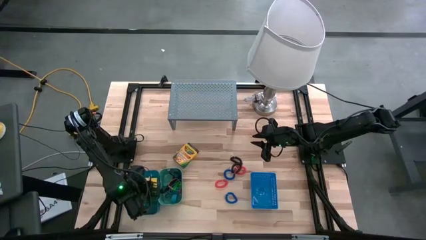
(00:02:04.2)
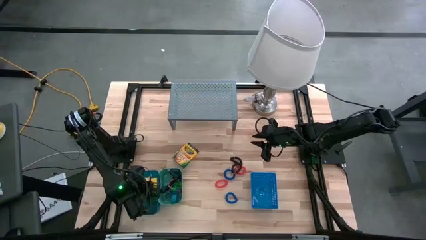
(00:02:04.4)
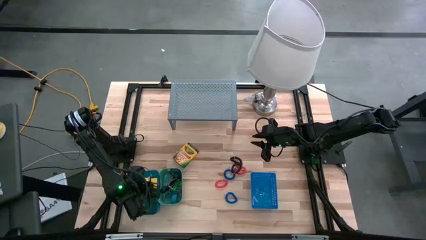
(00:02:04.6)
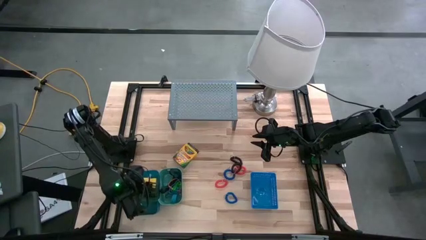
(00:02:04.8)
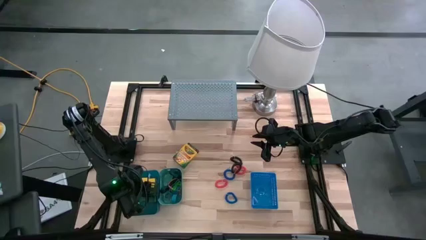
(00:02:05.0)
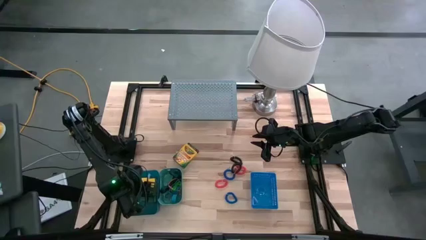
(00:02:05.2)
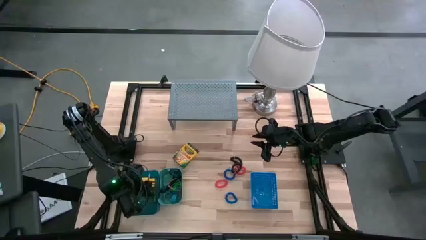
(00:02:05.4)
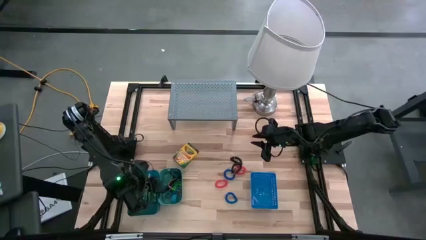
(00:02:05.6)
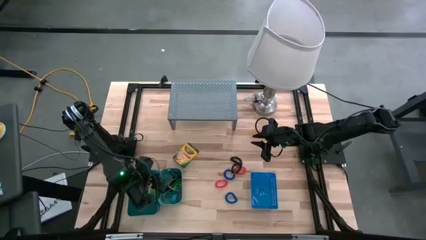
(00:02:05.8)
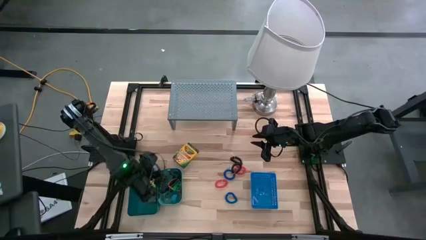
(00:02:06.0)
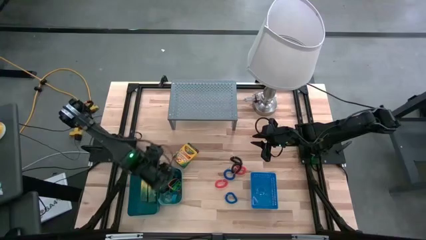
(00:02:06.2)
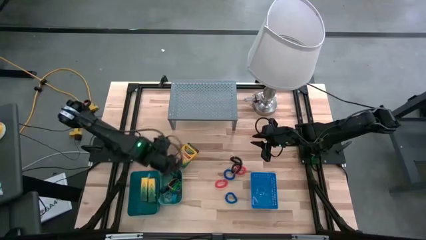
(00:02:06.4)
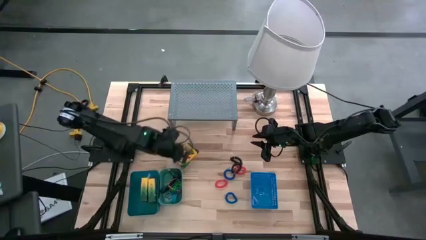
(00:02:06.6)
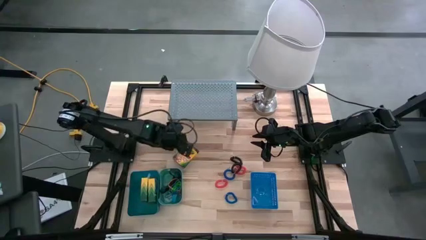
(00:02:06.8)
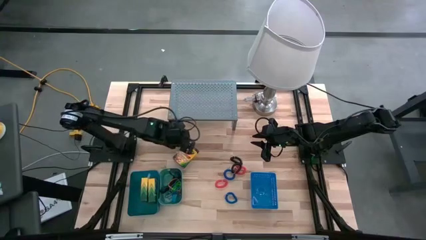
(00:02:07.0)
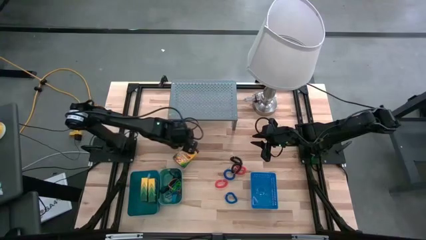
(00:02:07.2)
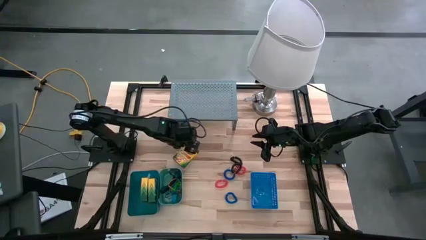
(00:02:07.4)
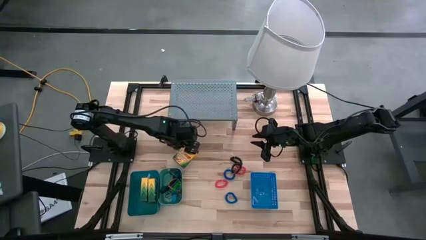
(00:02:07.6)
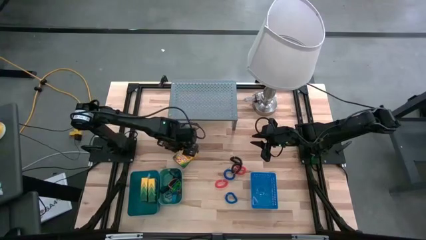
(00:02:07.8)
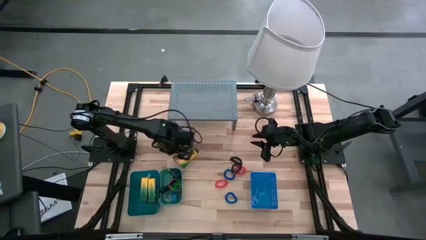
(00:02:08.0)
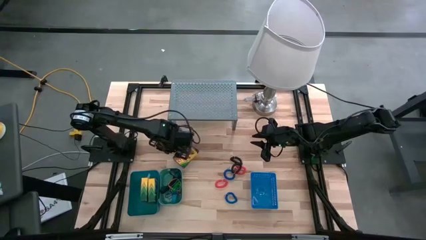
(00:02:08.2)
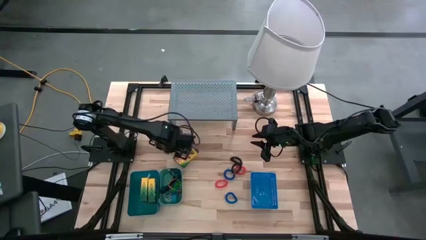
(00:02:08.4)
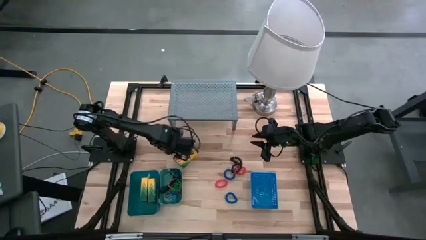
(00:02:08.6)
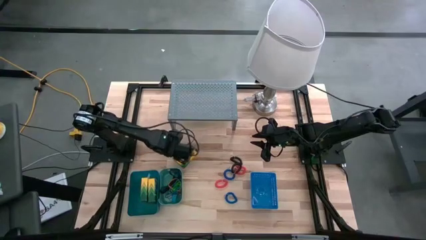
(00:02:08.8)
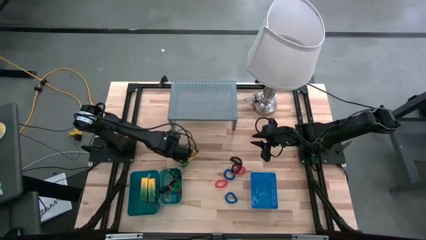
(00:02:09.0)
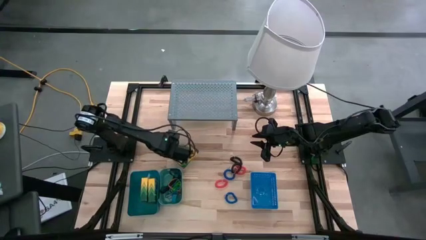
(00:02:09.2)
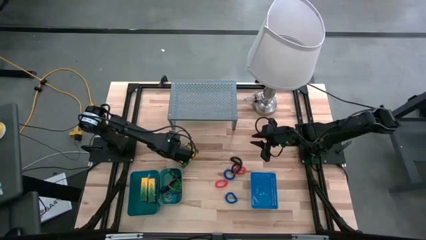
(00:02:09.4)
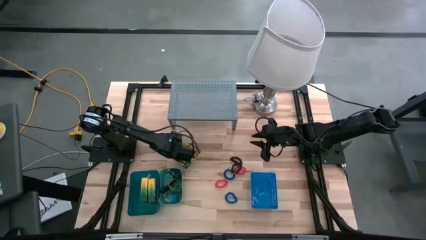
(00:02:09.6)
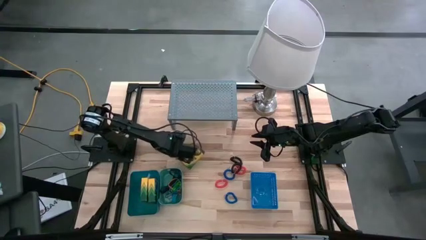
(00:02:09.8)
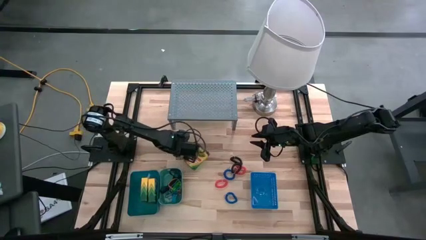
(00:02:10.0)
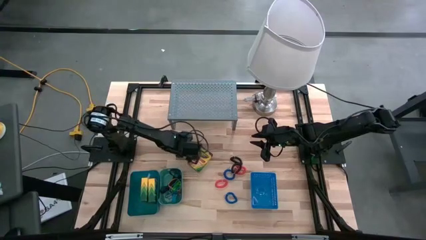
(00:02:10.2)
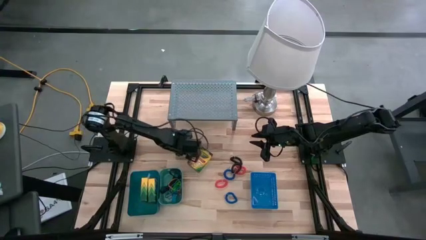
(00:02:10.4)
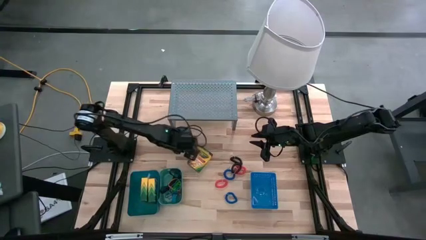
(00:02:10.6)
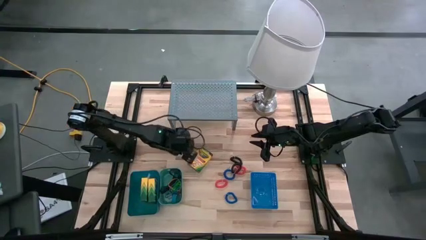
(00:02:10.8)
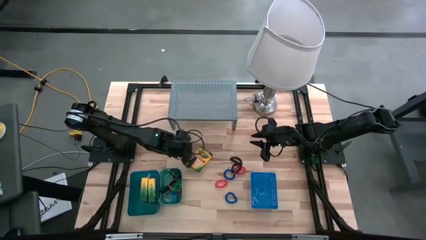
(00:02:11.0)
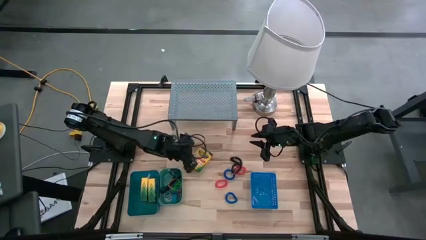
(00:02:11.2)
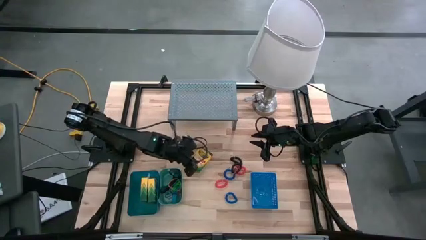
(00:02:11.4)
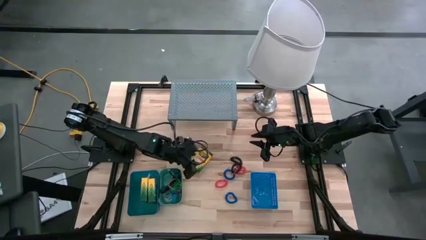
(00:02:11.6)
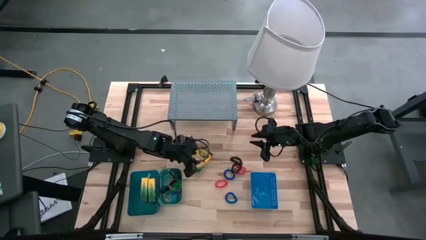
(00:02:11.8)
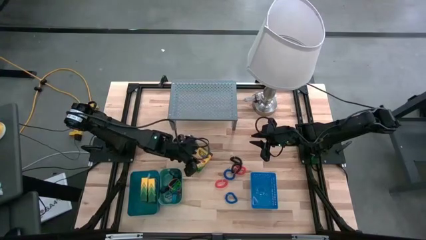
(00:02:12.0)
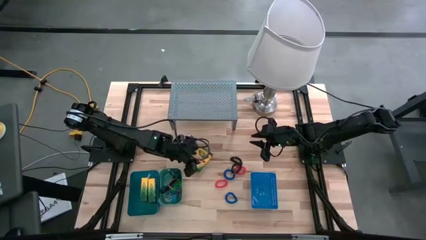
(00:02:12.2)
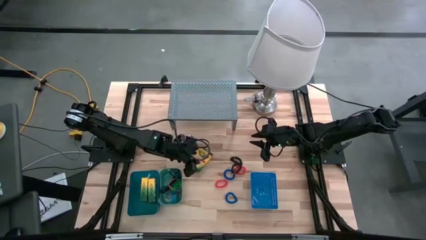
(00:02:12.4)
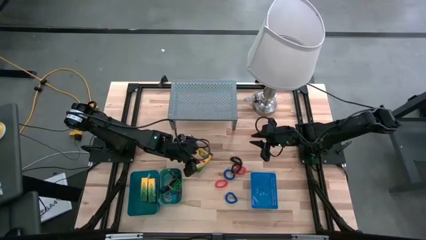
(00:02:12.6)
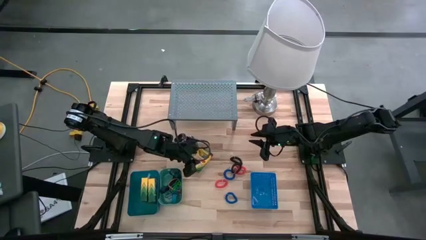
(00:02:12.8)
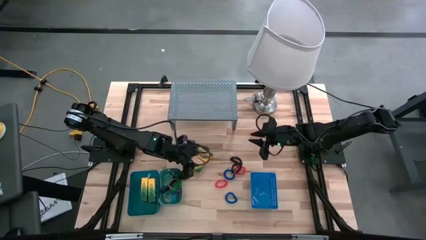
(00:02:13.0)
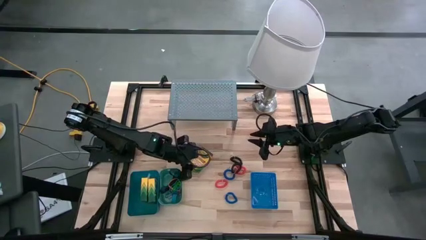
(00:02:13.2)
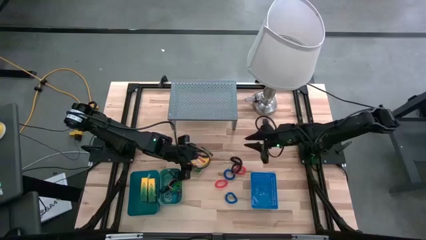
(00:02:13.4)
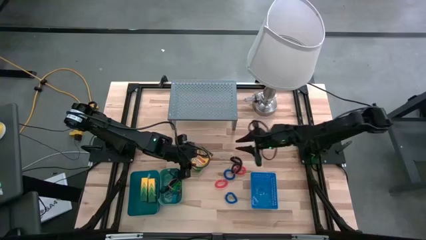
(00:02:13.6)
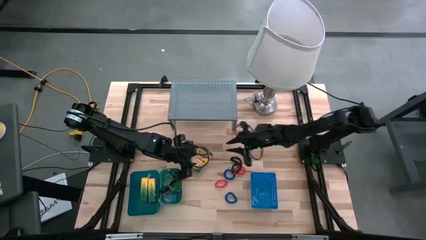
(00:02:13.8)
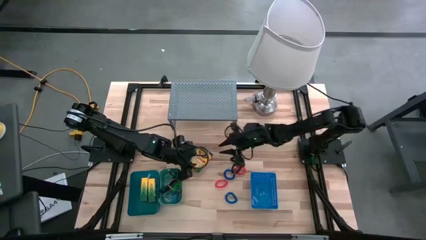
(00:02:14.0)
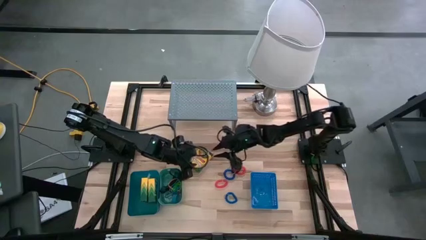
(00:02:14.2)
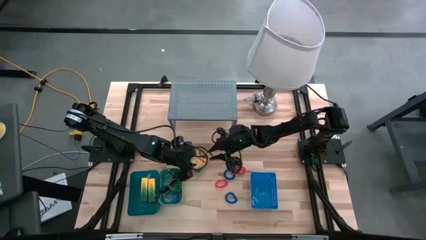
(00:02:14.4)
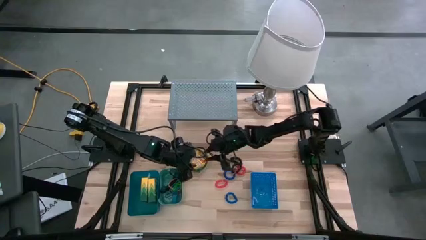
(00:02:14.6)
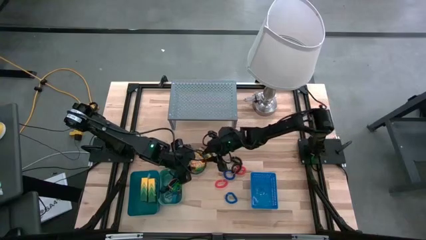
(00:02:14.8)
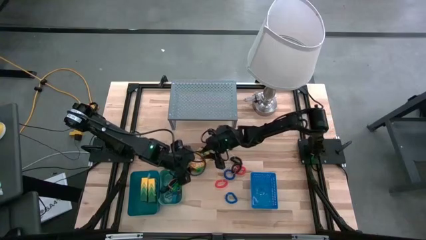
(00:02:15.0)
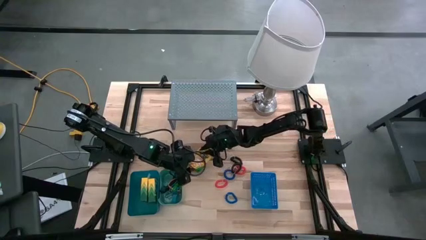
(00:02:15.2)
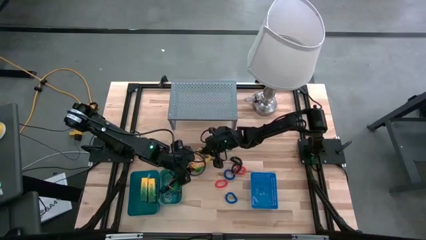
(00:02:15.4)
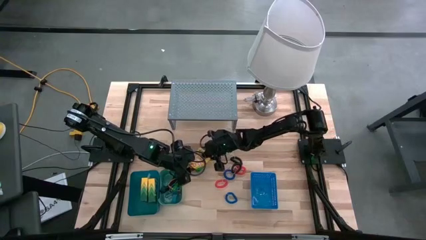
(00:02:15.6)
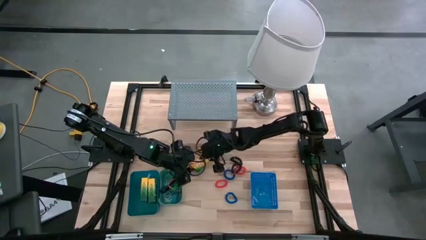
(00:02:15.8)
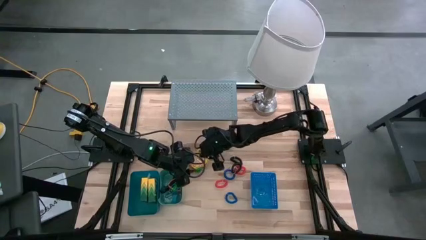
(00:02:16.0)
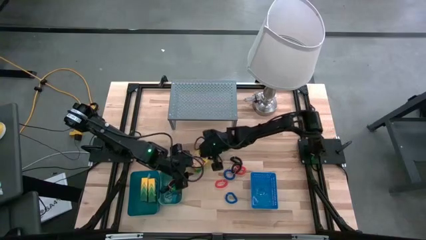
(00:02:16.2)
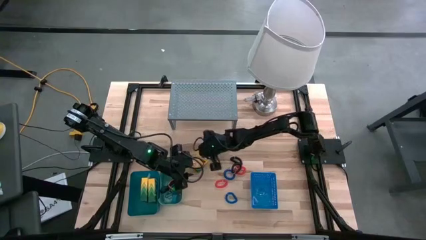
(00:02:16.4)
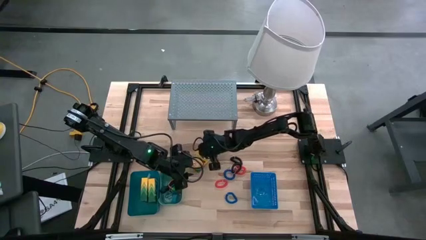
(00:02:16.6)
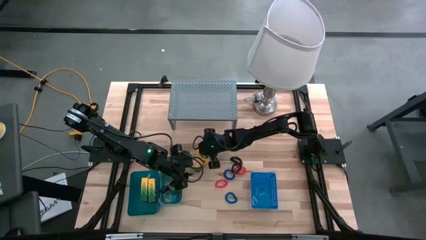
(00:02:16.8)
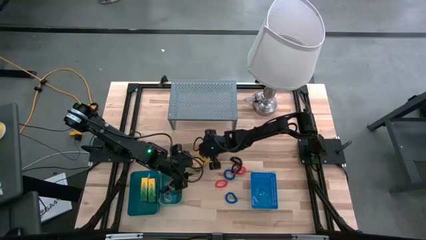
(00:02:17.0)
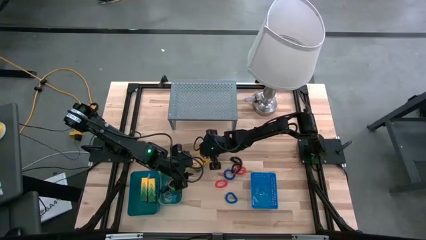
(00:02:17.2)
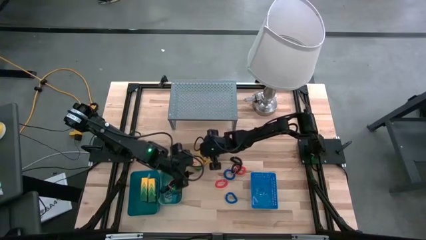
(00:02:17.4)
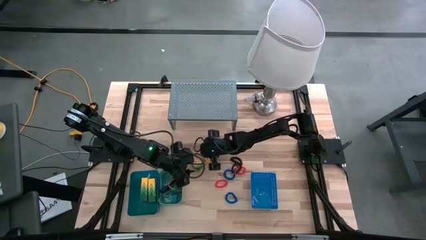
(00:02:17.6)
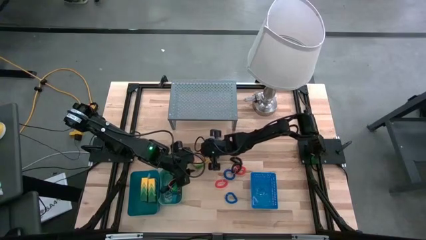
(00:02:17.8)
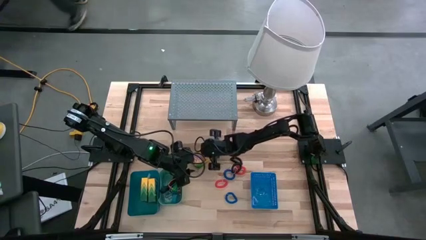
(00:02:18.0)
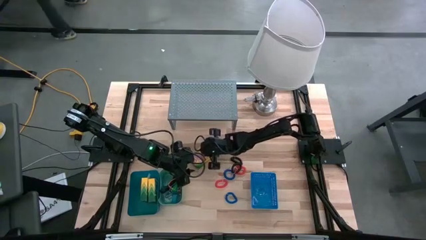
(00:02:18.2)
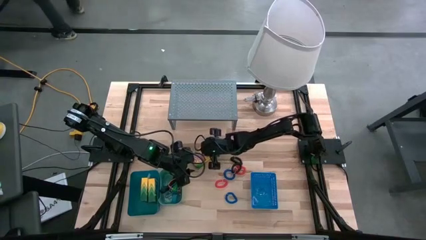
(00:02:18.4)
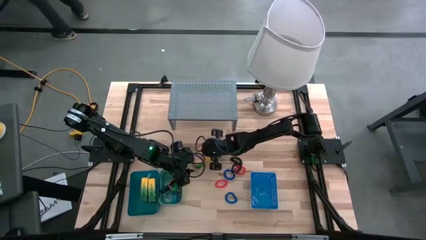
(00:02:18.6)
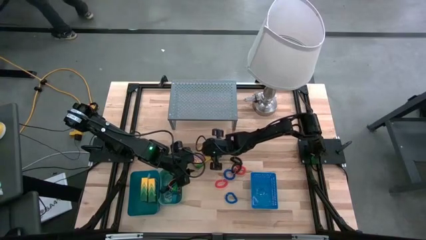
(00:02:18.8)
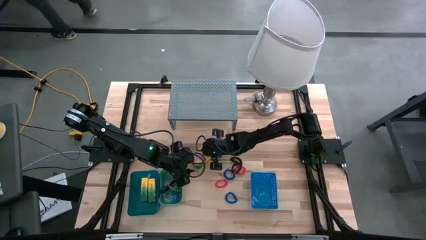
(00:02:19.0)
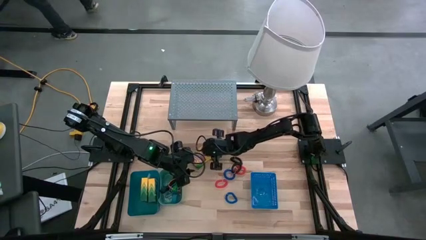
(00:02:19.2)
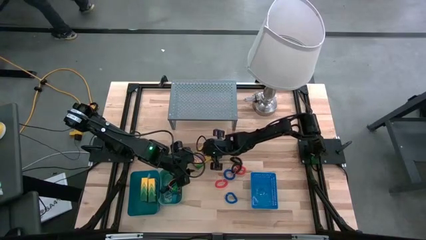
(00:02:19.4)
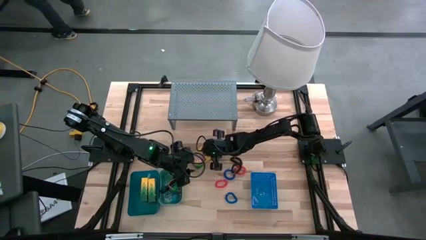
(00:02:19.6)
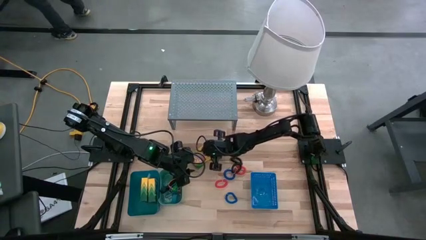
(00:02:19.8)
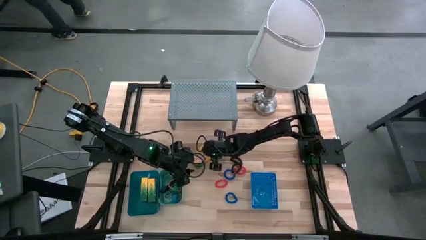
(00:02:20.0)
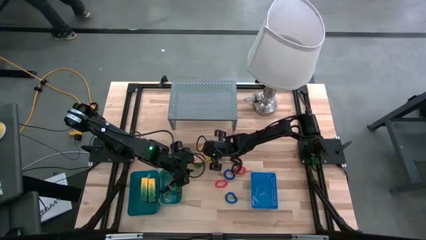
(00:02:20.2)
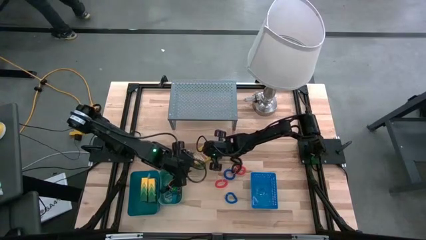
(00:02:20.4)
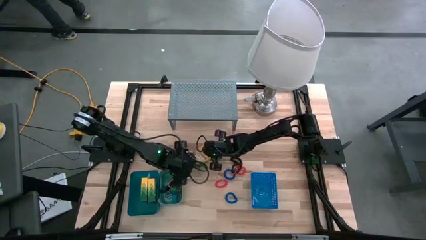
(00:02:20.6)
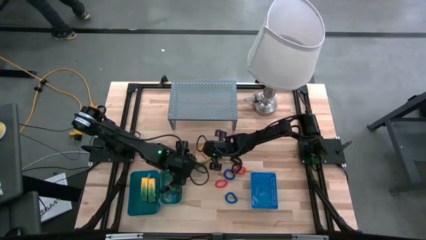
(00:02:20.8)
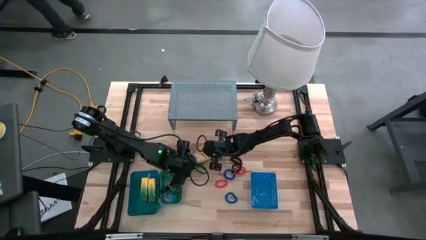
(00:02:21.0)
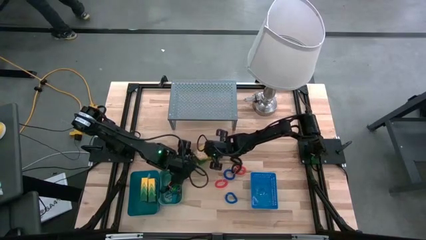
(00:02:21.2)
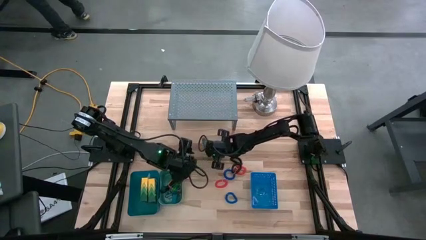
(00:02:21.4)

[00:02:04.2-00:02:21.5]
Task: Pick & Place Office Desk Supplies
Put the box of crayons into the light blue bin
